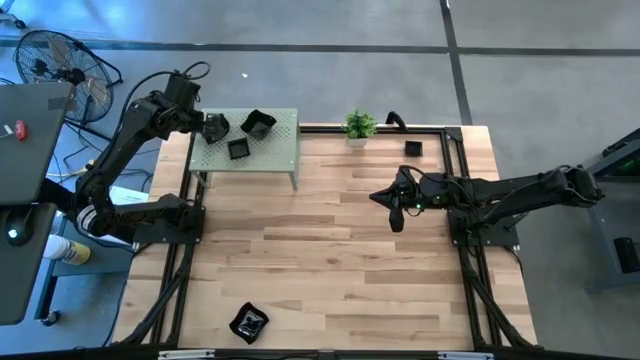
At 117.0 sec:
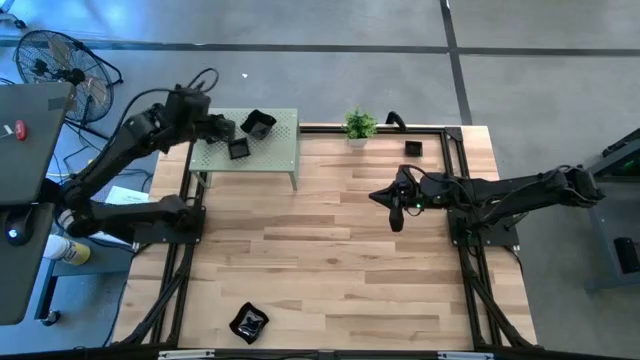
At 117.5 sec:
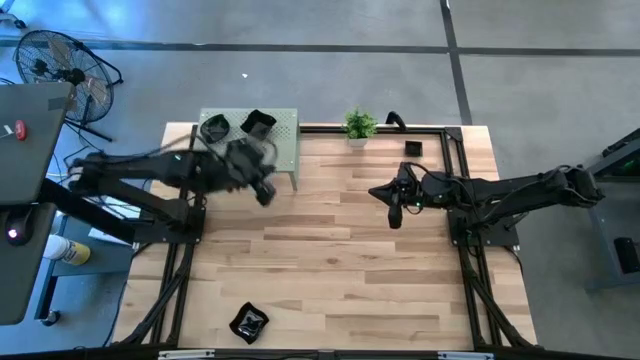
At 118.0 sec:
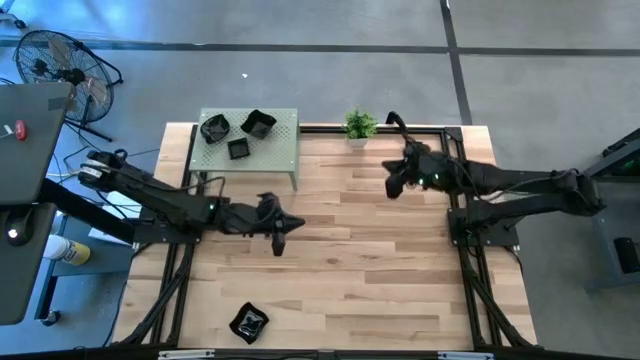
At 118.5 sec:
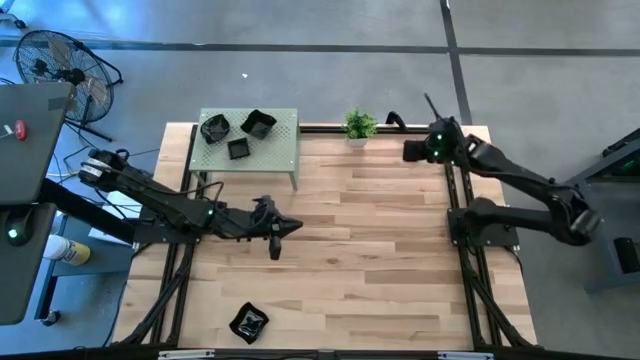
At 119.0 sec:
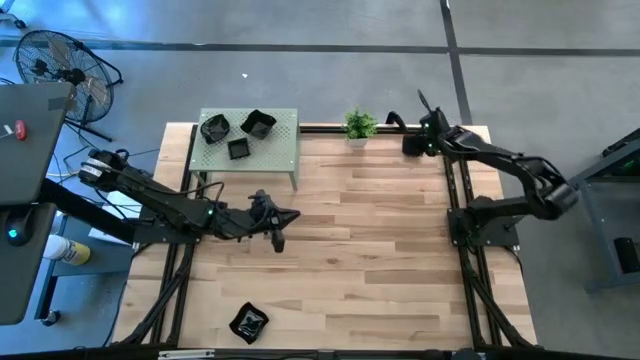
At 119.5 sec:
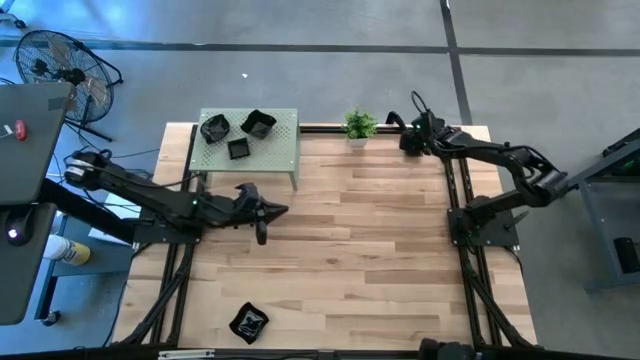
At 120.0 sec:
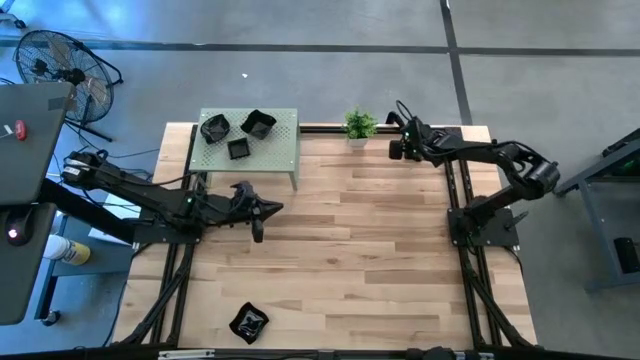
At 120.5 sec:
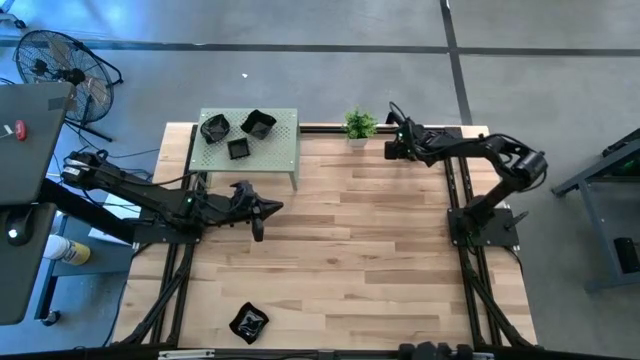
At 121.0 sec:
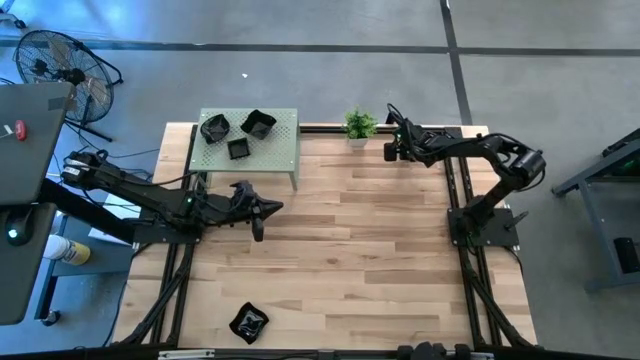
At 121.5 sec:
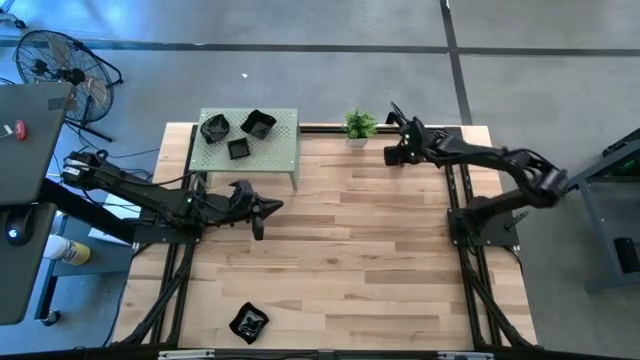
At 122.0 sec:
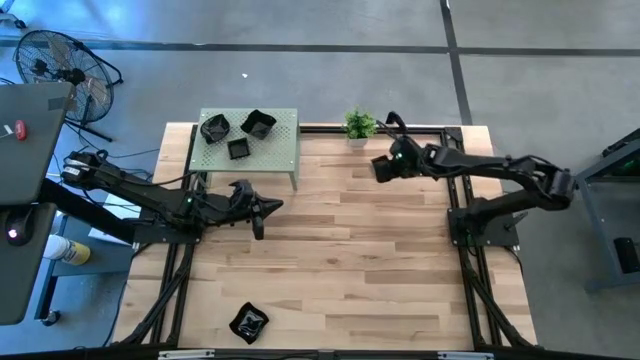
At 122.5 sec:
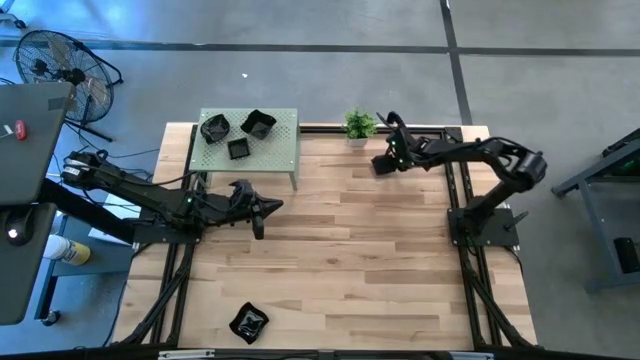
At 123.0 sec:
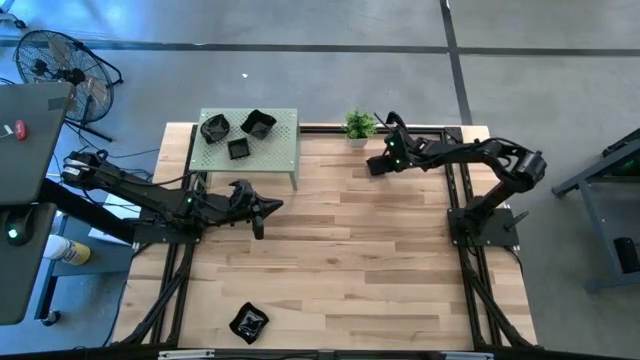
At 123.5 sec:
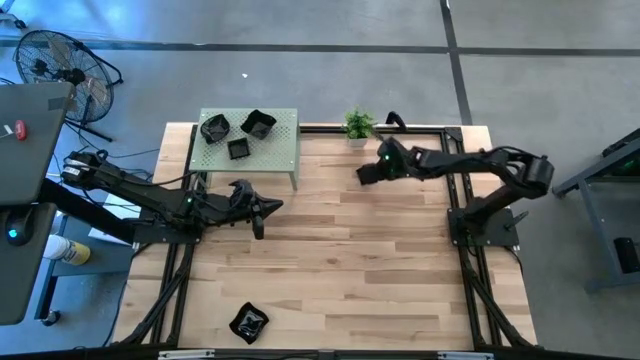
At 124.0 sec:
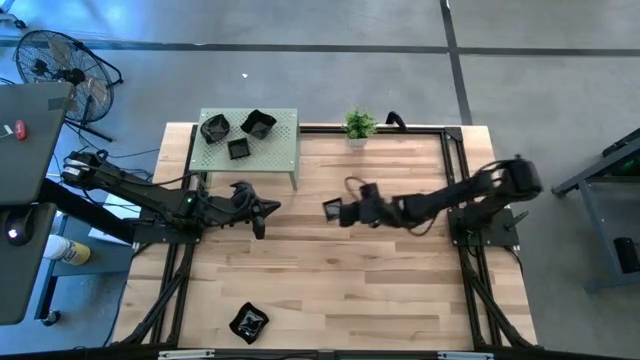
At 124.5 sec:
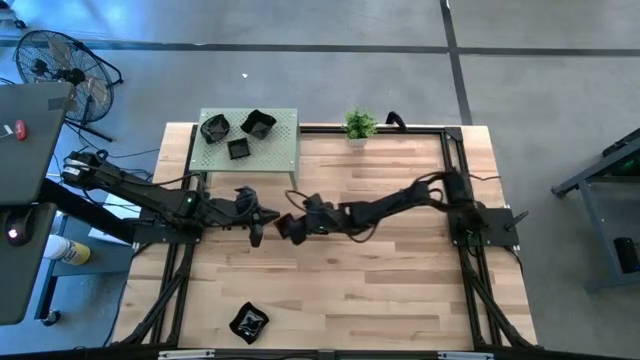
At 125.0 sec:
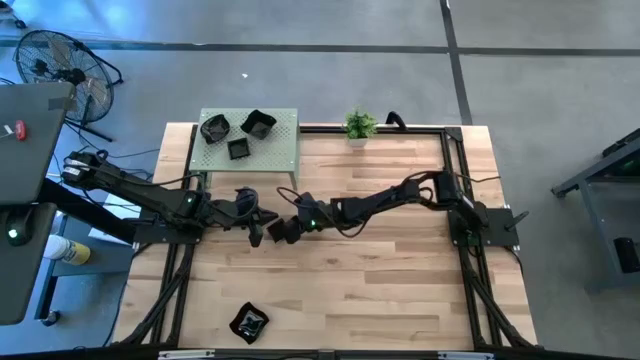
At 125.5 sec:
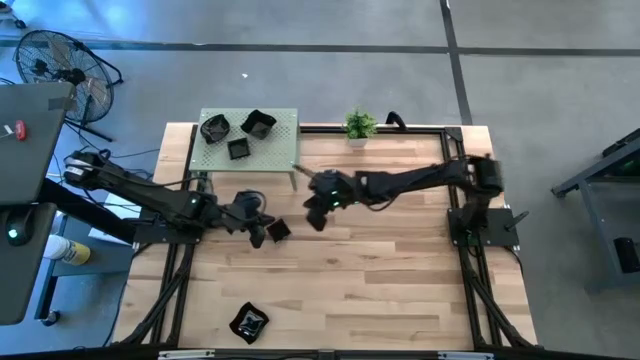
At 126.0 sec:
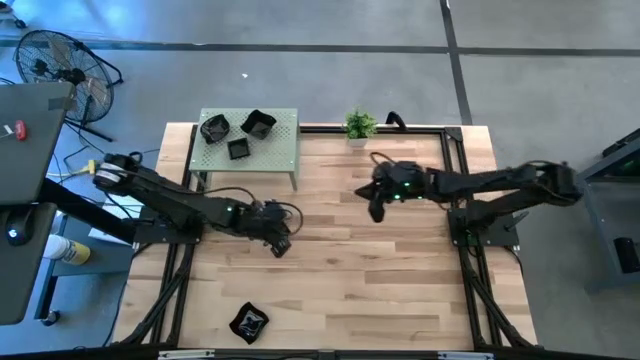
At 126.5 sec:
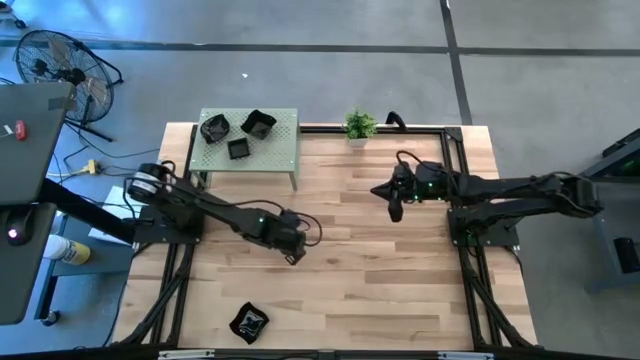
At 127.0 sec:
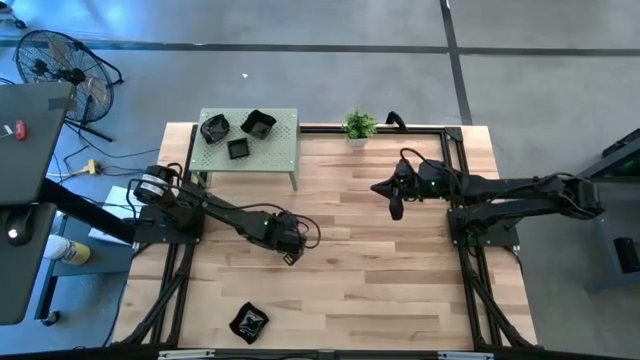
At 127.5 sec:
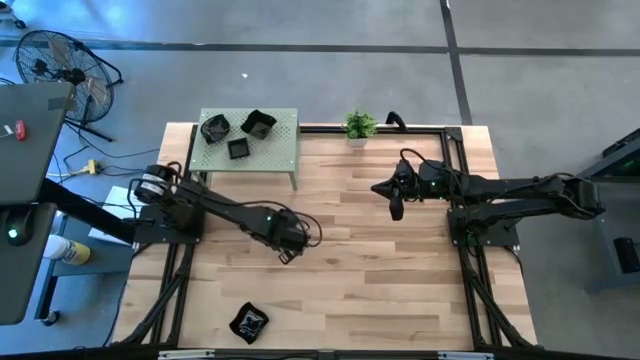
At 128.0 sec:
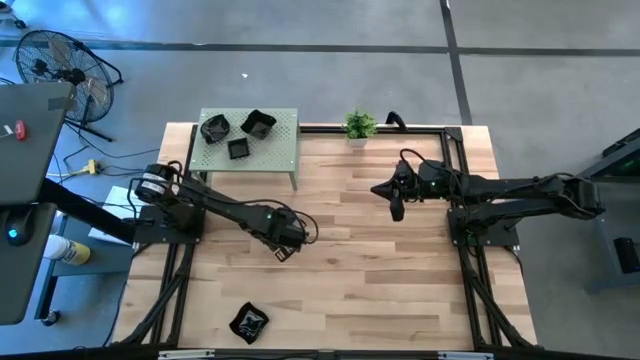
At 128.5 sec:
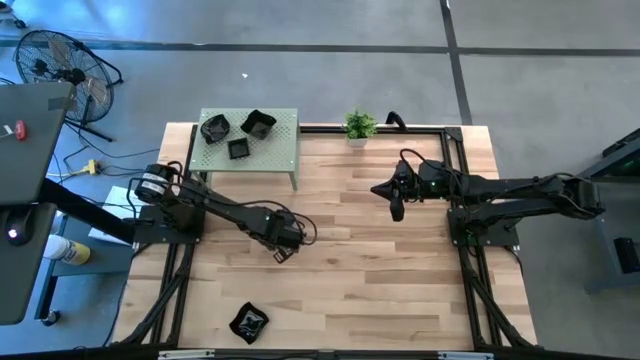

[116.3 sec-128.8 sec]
Task: Pick & Place Mini shaped plates
Stack the black square plate on top of the stacked black square plate on the shelf

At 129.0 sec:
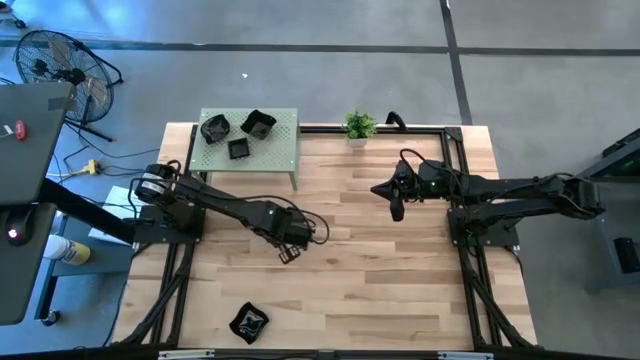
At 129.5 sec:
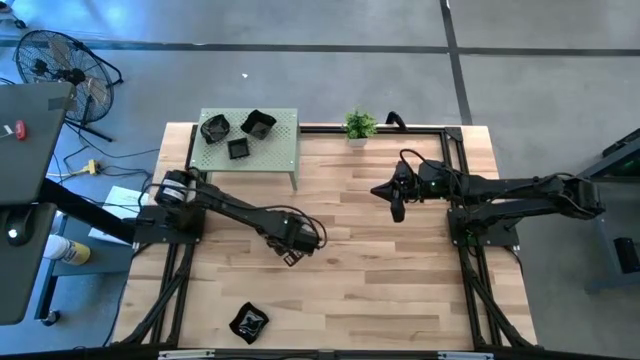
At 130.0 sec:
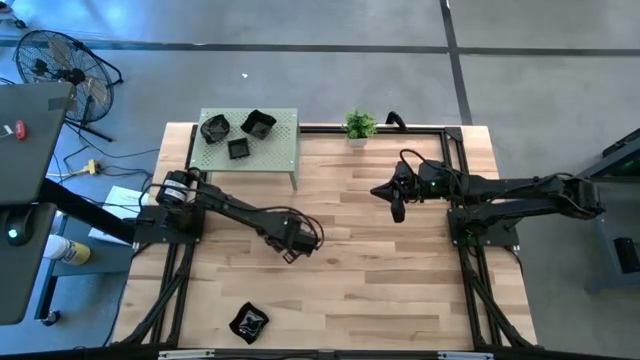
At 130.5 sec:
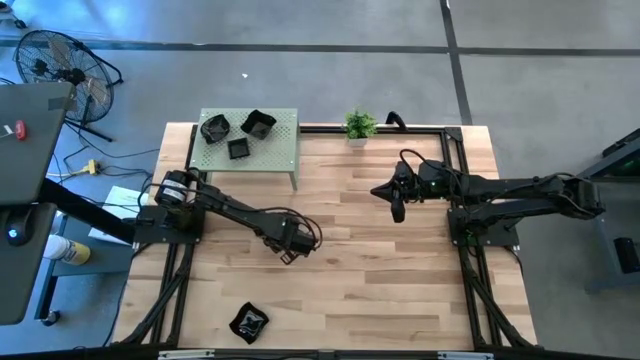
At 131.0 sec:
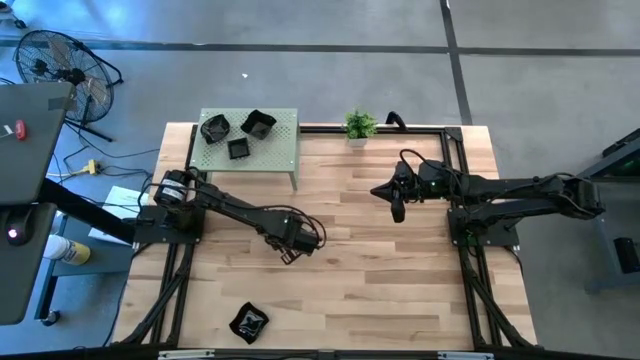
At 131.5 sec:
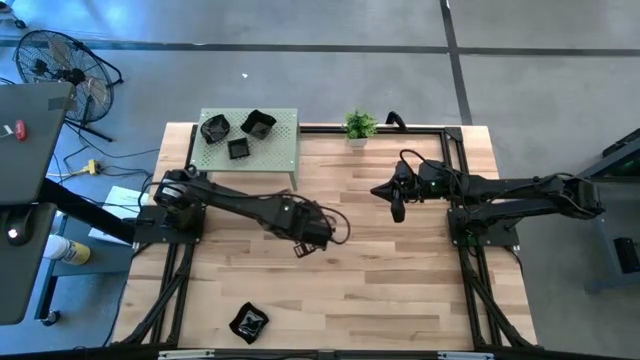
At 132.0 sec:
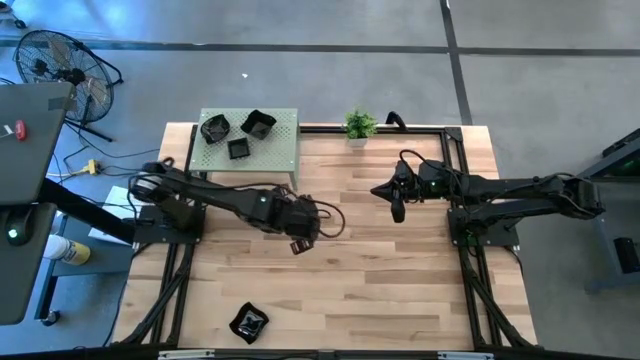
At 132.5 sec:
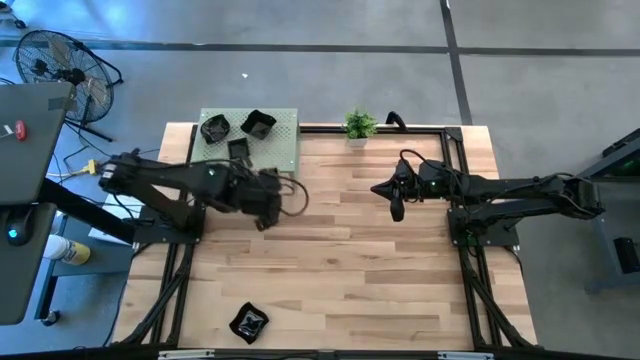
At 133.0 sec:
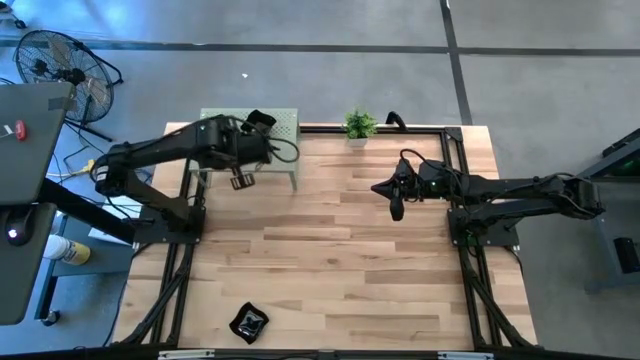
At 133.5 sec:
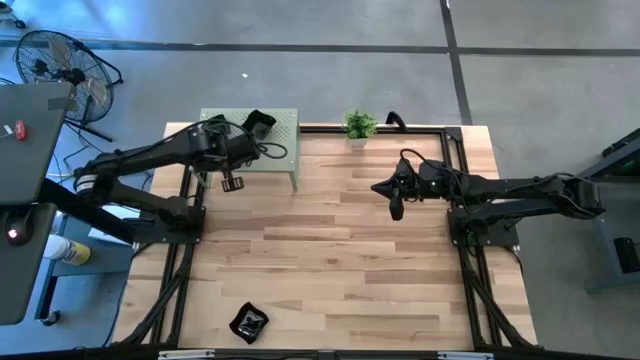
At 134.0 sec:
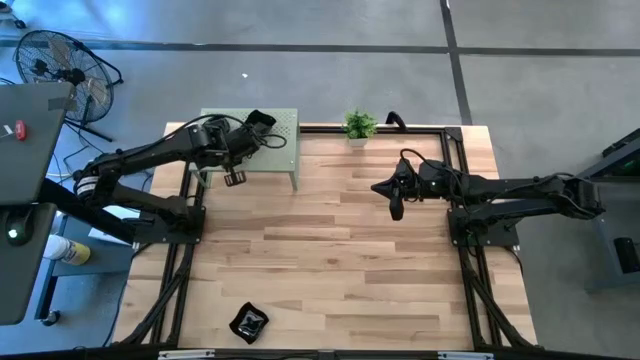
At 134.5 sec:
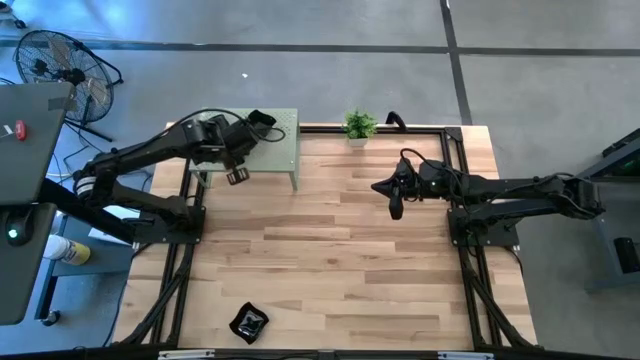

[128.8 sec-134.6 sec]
Stack the black square plate on top of the stacked black square plate on the shelf

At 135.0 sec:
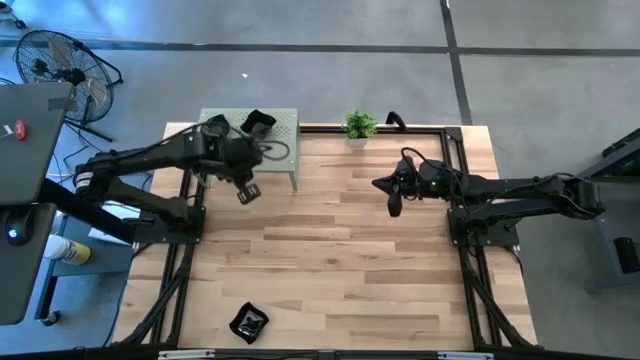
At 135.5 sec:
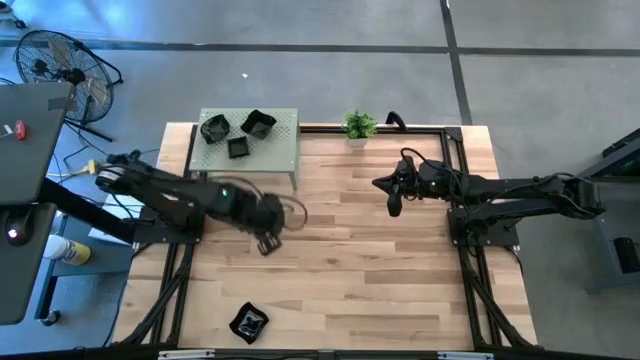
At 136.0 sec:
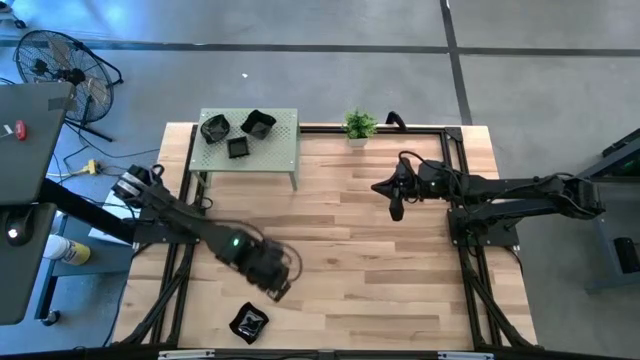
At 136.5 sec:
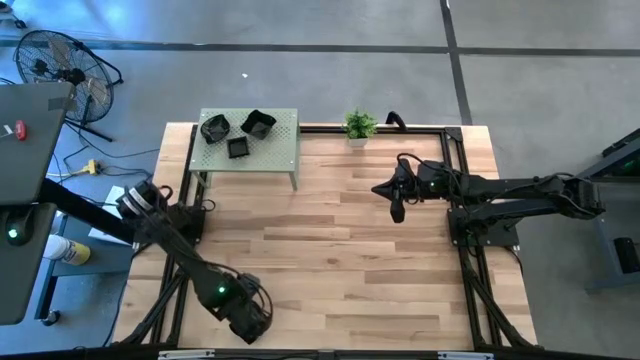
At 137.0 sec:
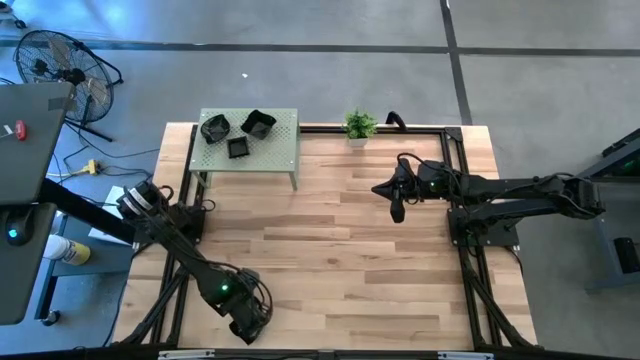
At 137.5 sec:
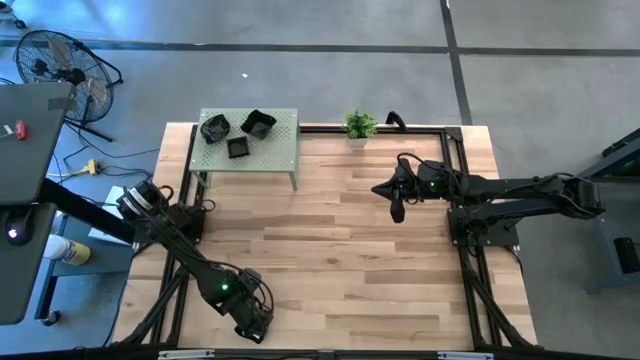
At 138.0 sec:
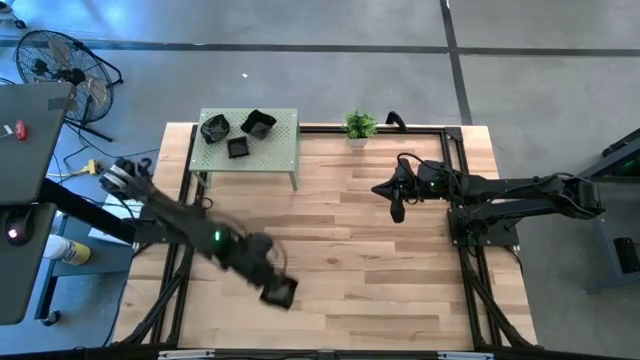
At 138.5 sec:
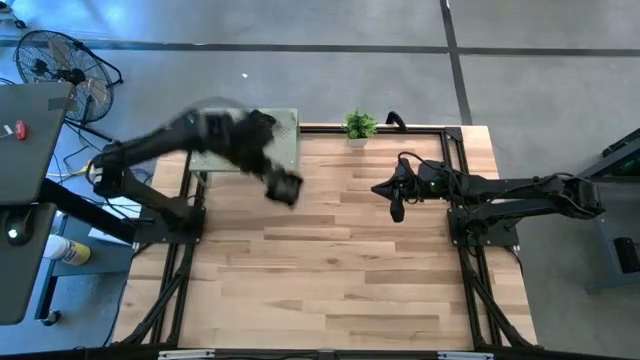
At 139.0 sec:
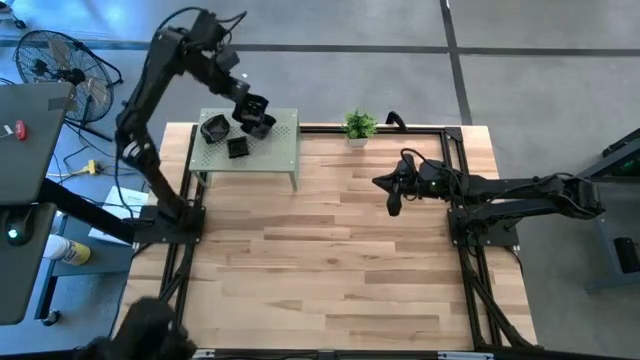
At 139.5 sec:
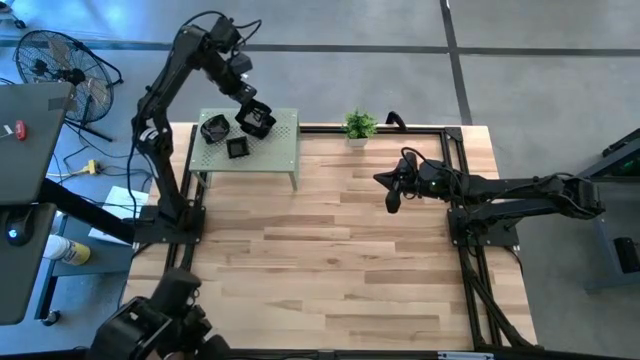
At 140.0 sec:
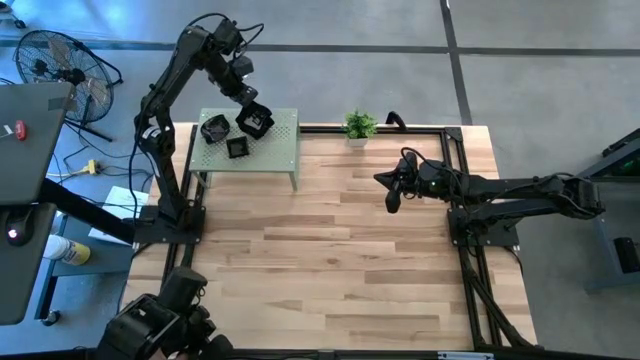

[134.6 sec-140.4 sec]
Stack the black distorted square plate on top of the stacked black distorted square plate on the shelf
